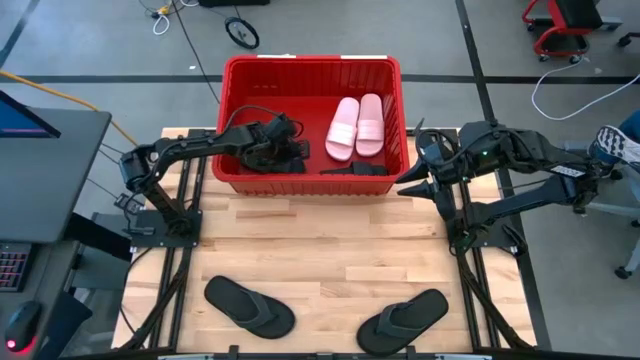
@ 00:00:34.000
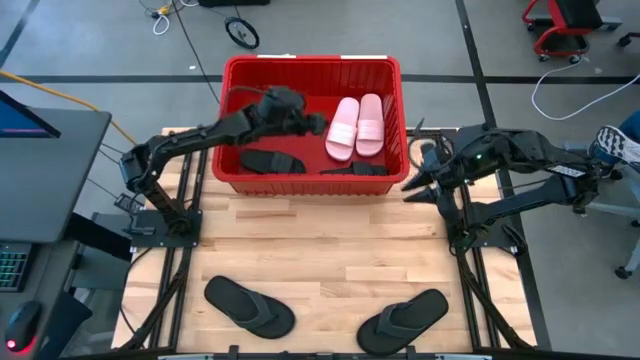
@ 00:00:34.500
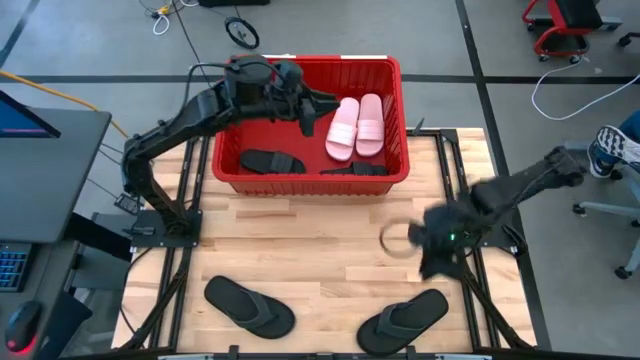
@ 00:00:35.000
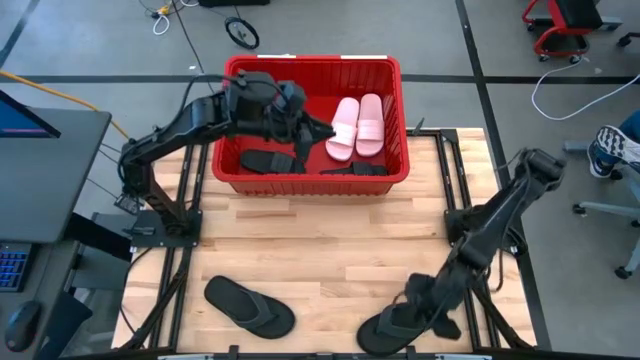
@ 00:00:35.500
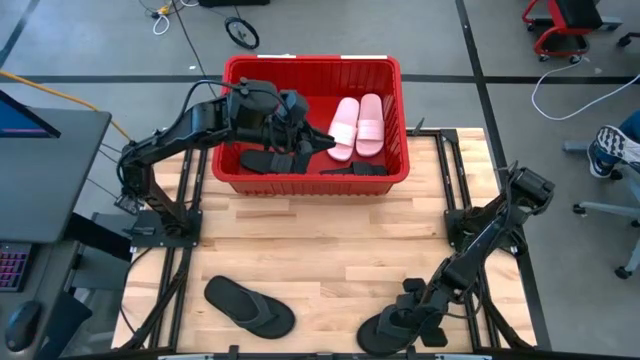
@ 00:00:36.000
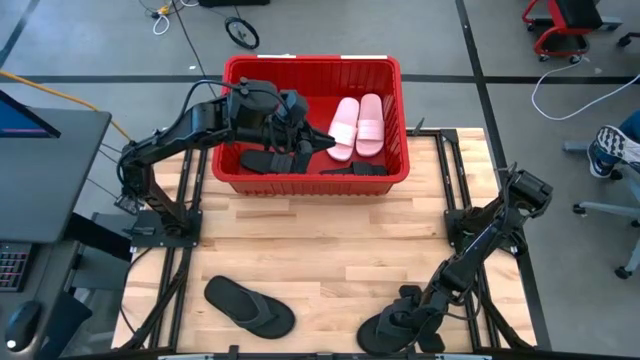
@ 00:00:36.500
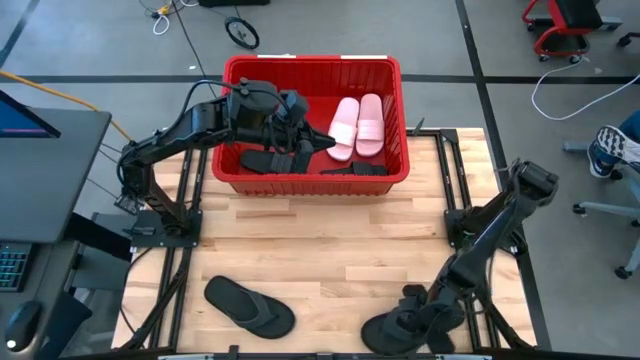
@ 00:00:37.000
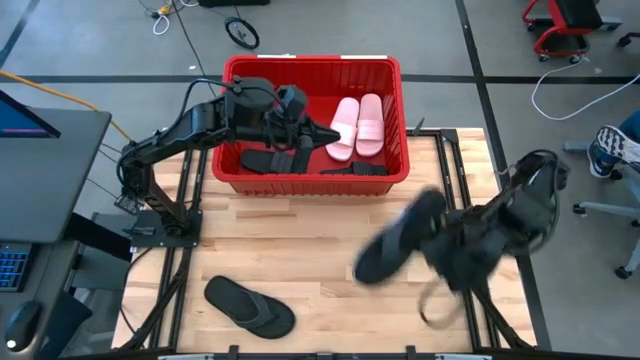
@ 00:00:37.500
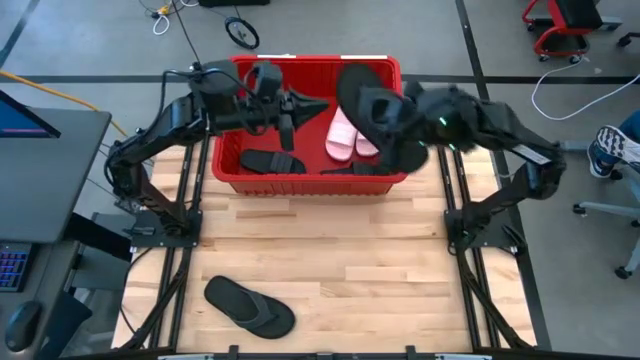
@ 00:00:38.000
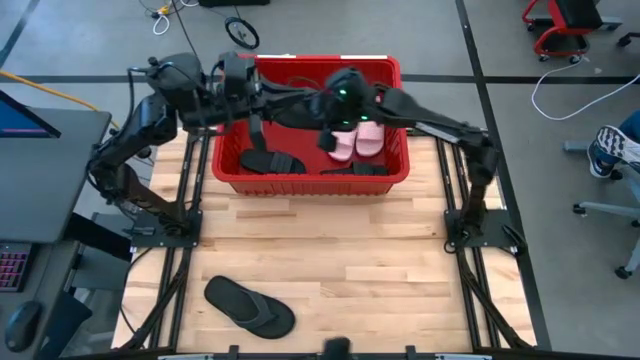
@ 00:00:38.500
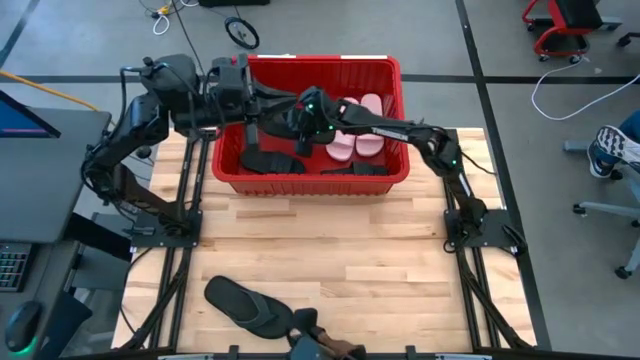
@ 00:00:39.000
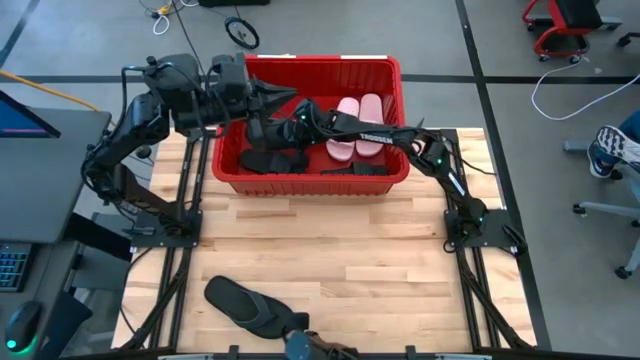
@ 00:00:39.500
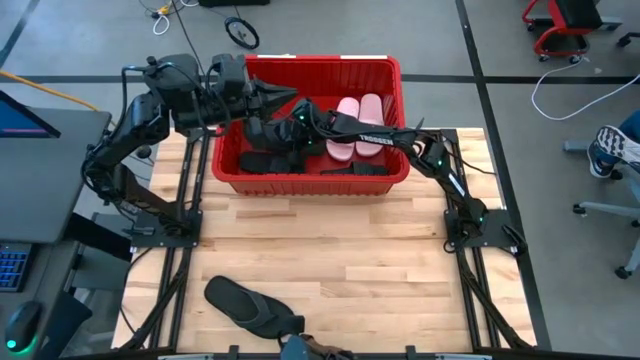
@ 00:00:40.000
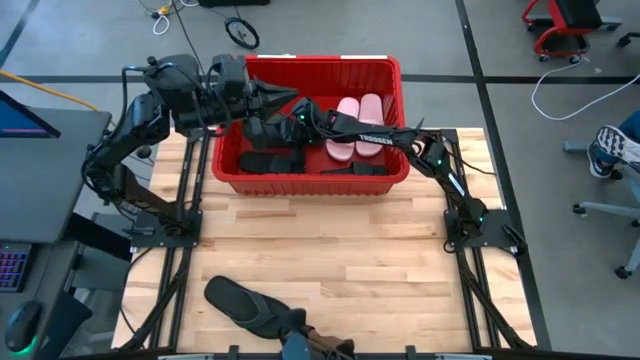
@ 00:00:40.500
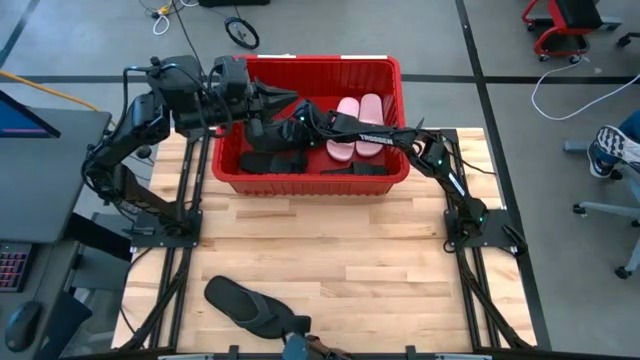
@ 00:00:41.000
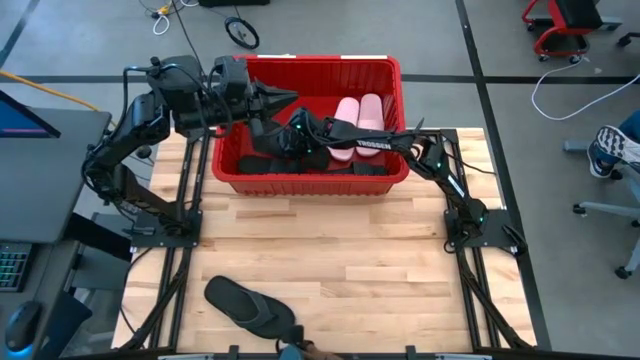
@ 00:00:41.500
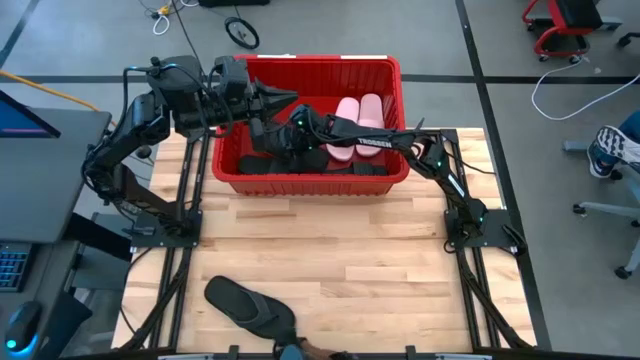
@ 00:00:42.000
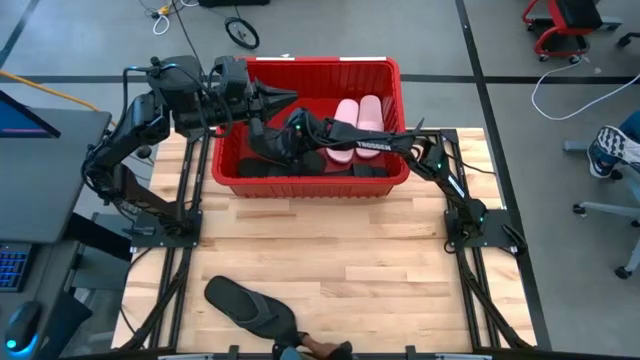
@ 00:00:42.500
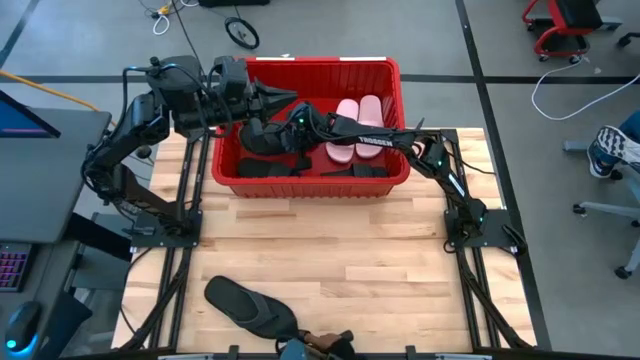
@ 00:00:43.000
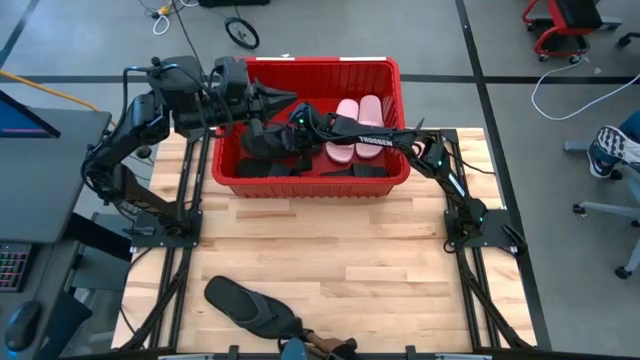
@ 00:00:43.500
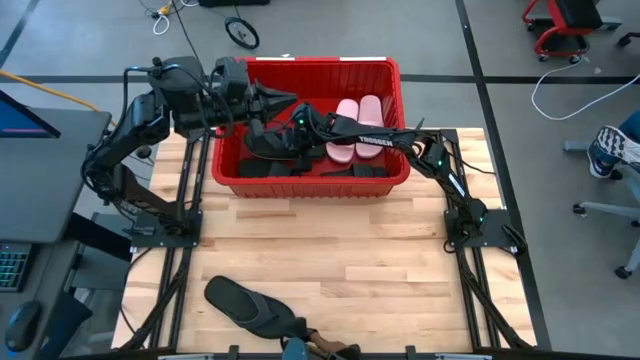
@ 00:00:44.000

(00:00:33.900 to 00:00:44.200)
Task: Pick and place slides into bin
Put the right slipper into the red bin

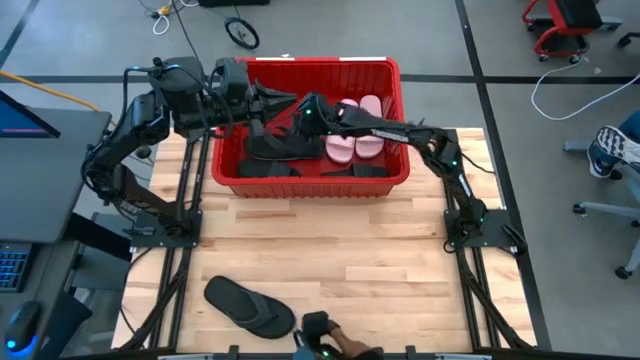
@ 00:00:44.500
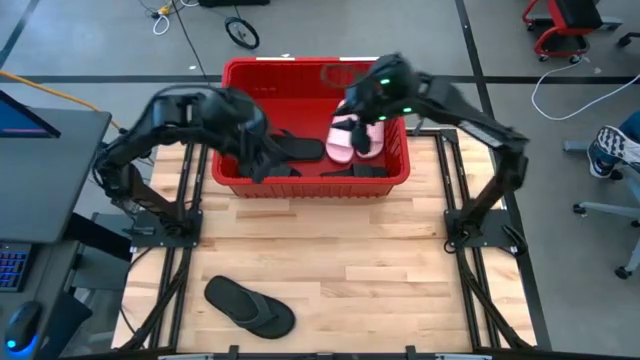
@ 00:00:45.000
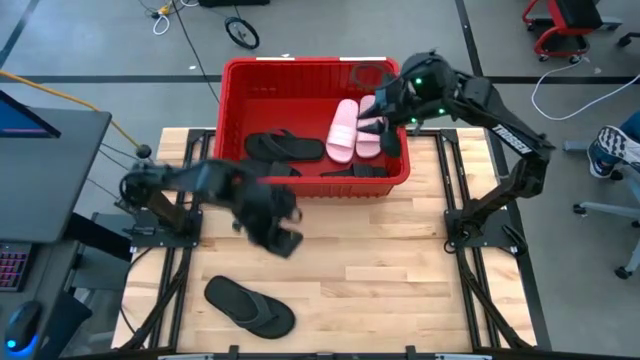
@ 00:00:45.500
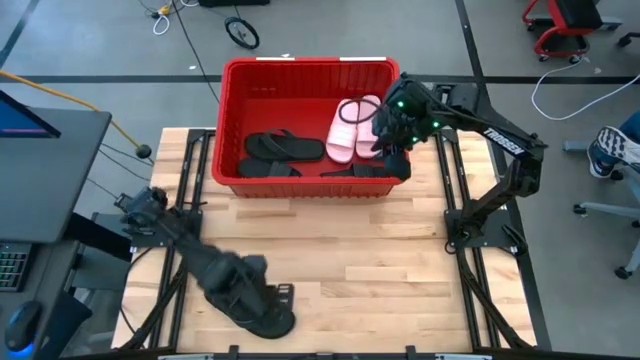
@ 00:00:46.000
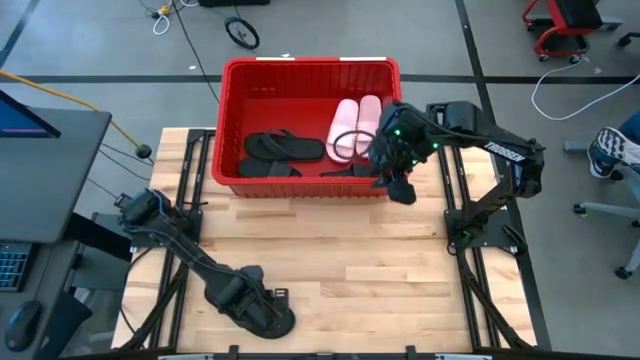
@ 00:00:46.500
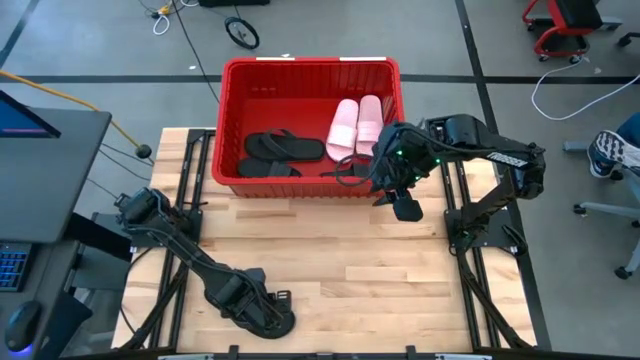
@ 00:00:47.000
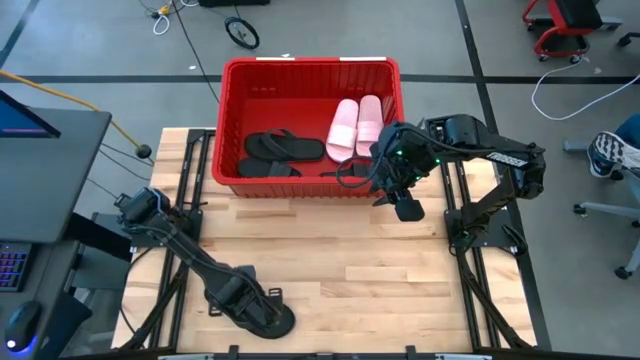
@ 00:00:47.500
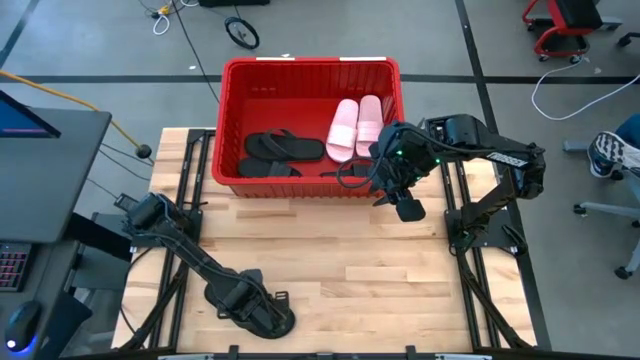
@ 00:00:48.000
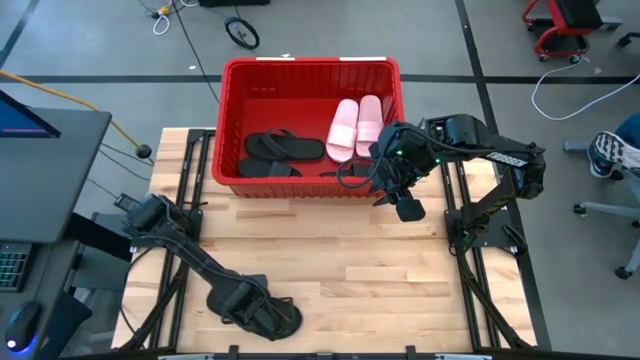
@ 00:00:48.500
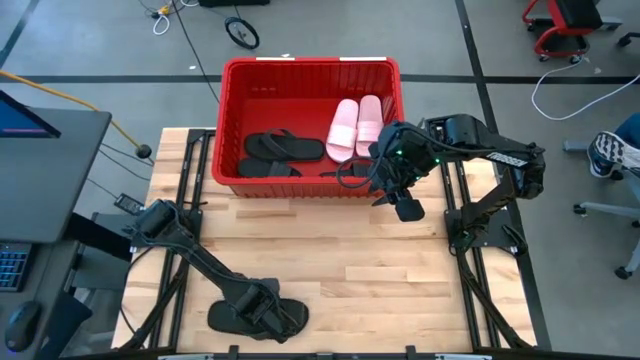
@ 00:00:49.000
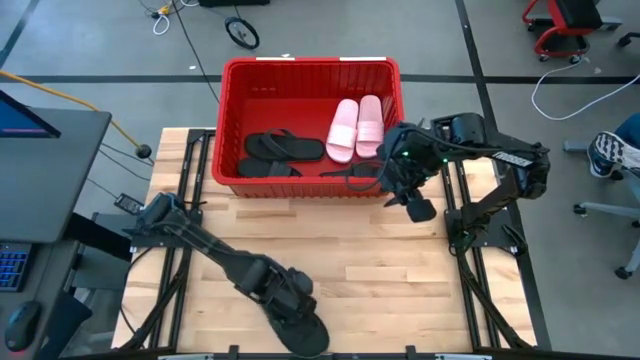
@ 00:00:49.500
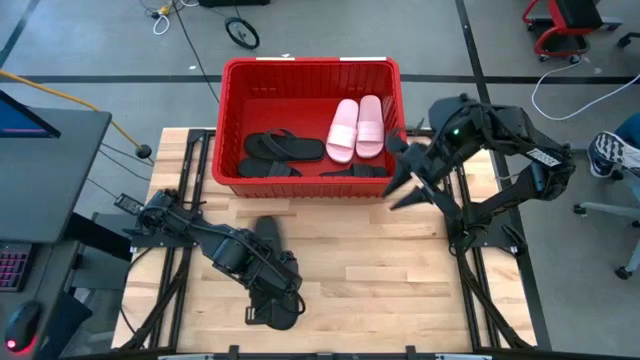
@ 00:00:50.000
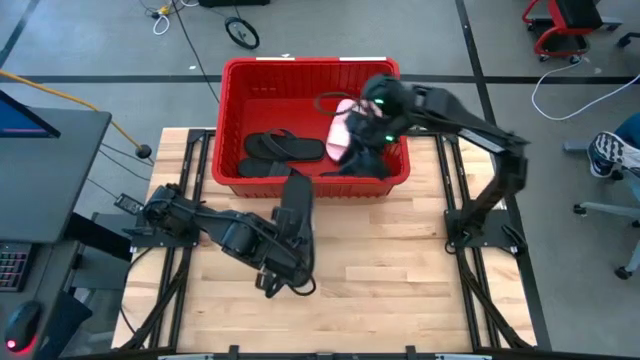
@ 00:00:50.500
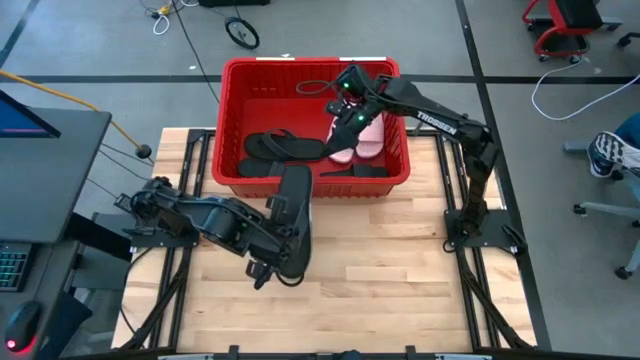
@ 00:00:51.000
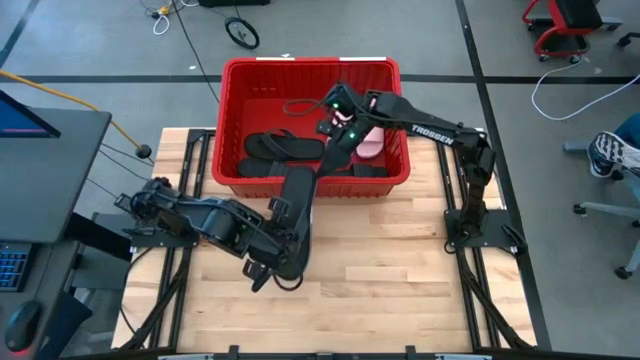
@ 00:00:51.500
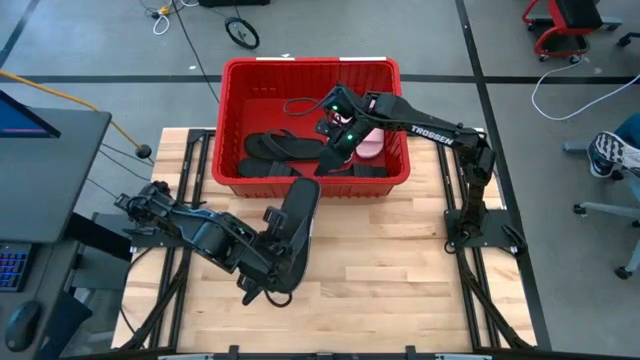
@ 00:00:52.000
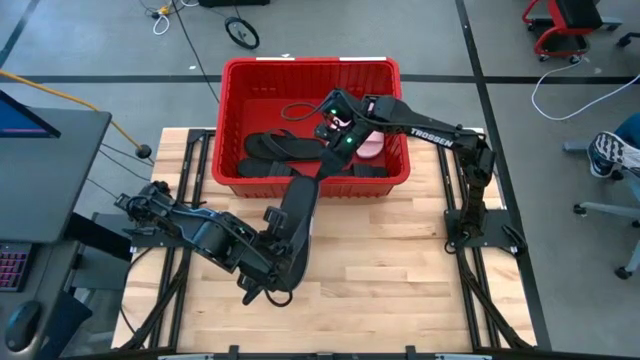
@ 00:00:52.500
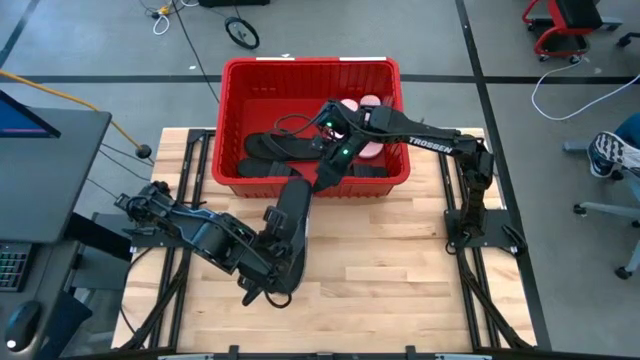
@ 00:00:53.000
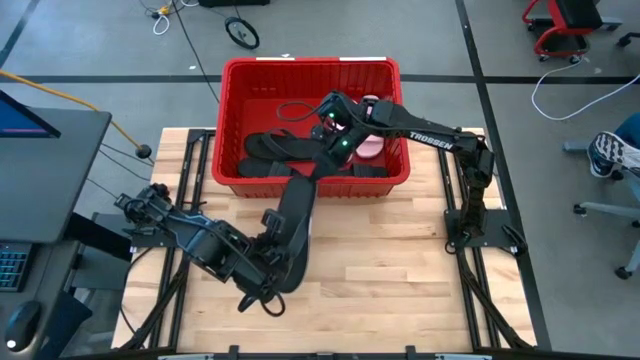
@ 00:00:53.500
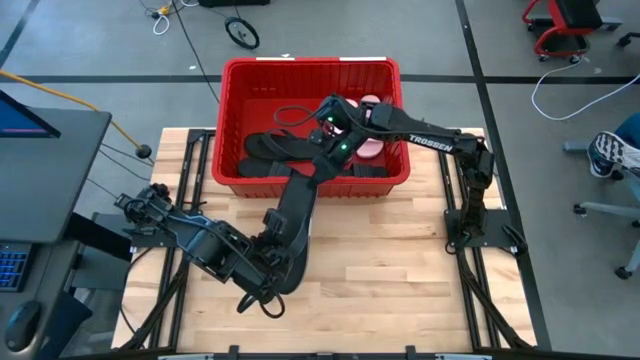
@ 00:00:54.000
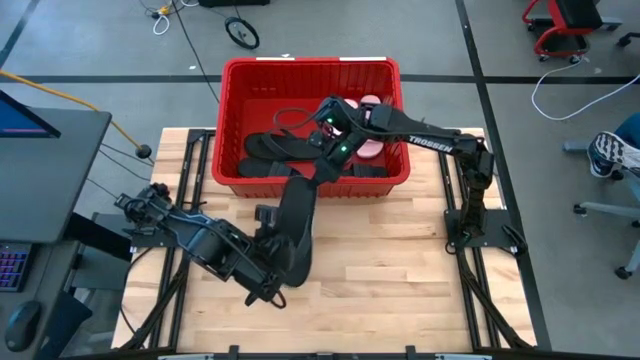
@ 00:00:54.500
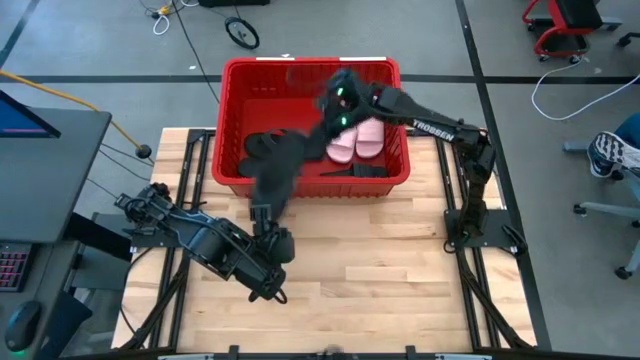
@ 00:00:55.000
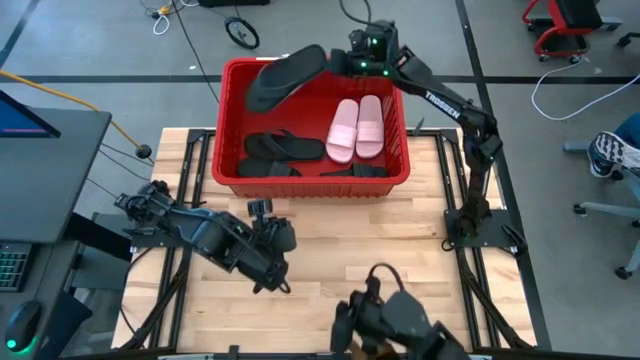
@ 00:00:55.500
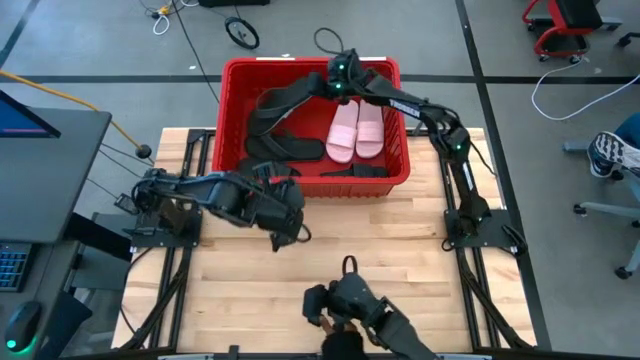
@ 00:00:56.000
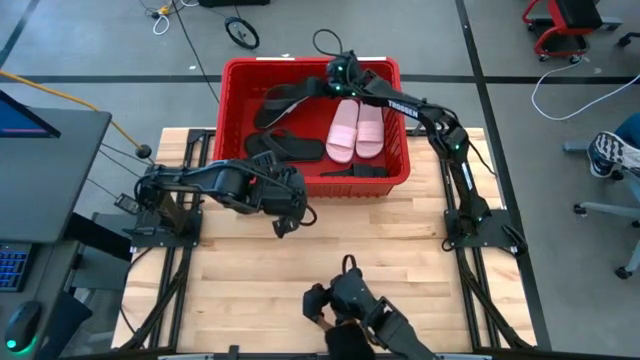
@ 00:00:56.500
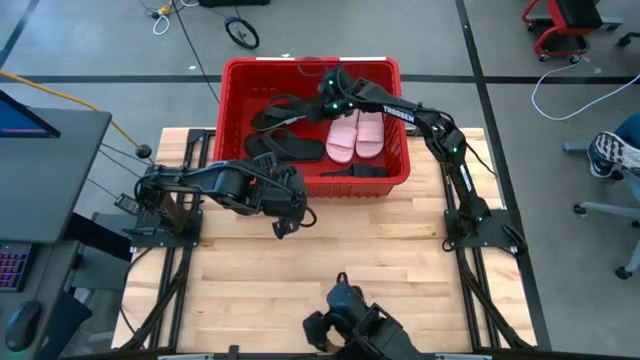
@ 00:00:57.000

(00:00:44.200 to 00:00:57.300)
Put the black slipper into the red bin
